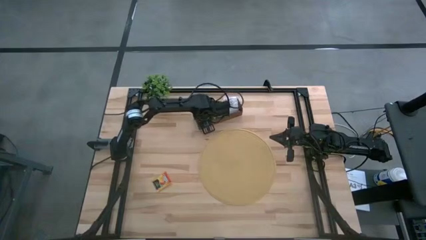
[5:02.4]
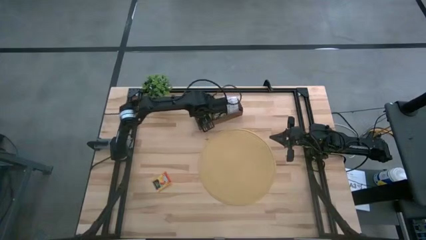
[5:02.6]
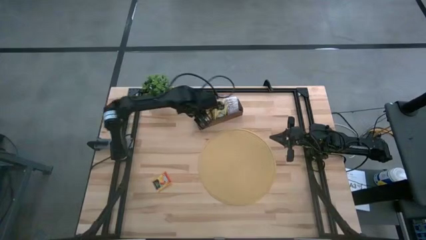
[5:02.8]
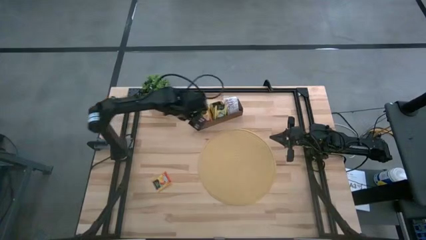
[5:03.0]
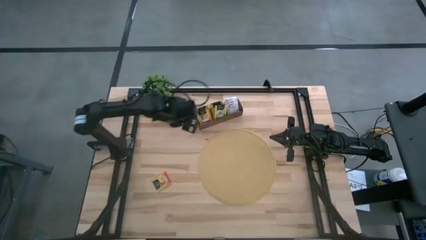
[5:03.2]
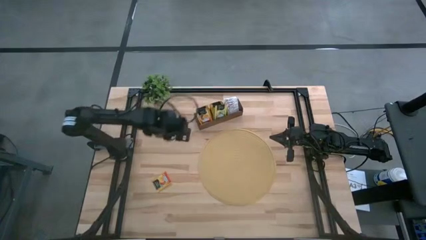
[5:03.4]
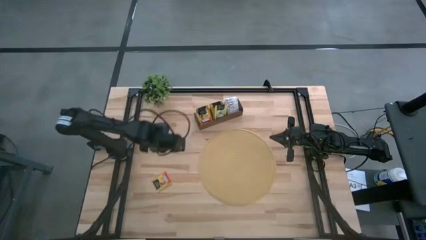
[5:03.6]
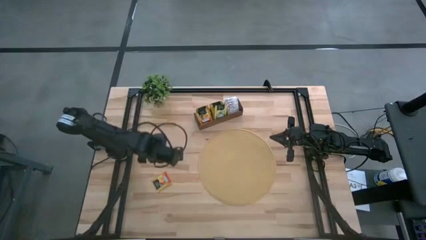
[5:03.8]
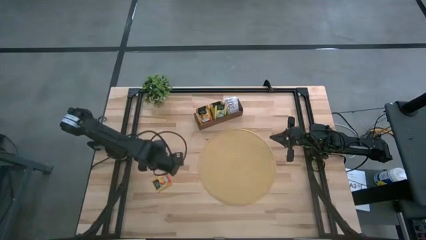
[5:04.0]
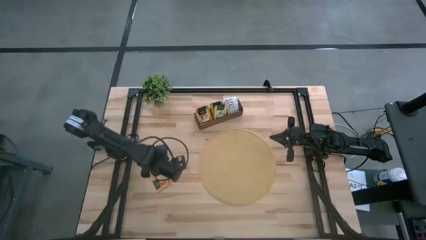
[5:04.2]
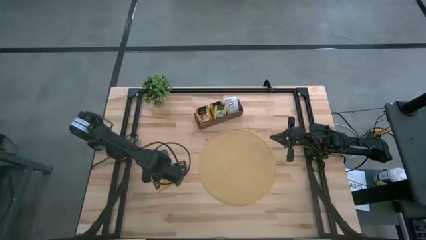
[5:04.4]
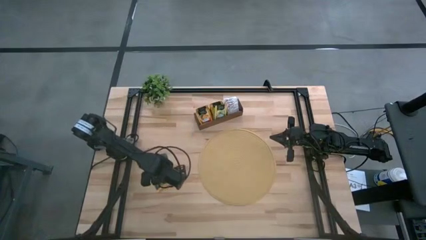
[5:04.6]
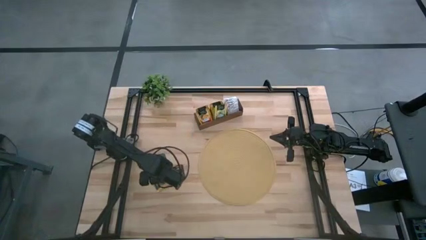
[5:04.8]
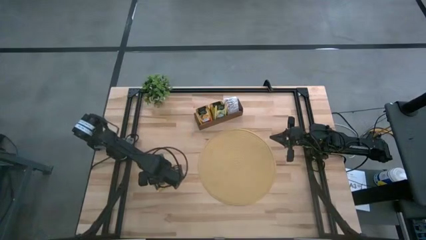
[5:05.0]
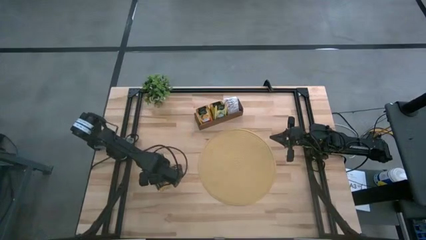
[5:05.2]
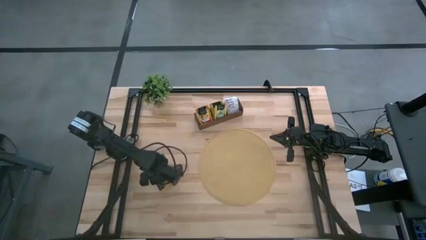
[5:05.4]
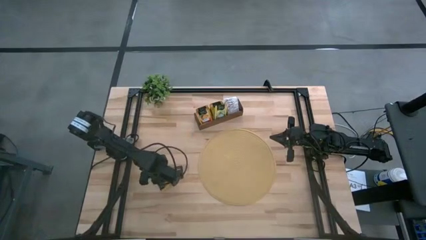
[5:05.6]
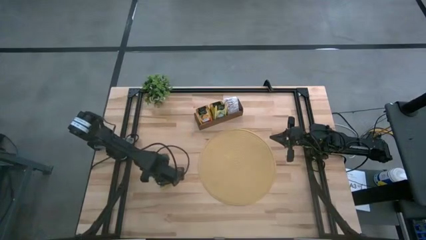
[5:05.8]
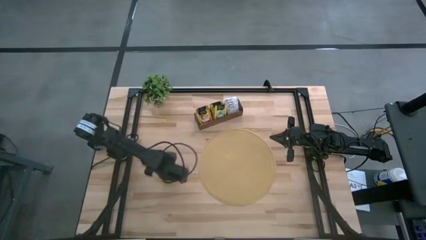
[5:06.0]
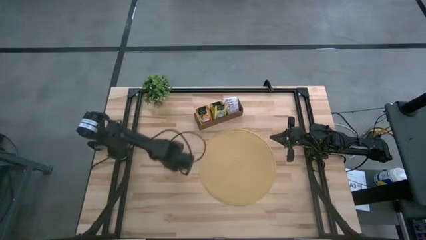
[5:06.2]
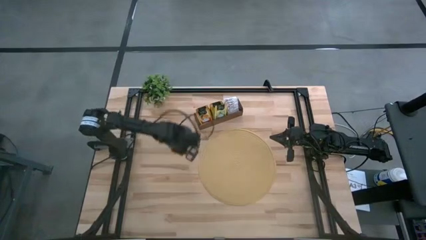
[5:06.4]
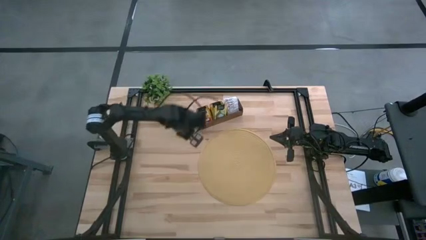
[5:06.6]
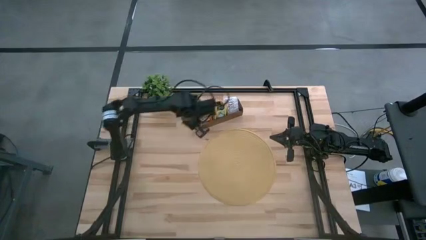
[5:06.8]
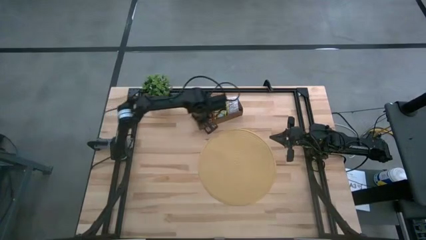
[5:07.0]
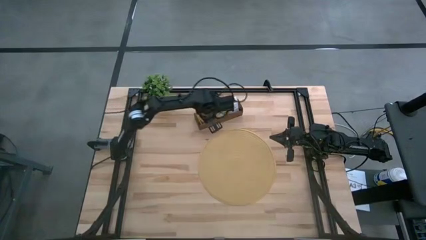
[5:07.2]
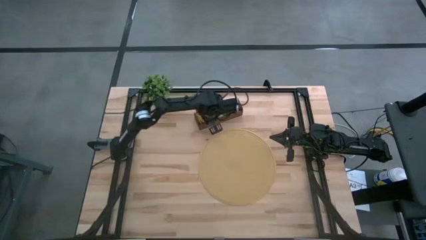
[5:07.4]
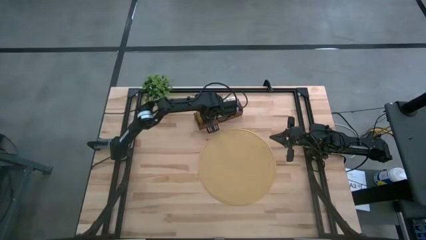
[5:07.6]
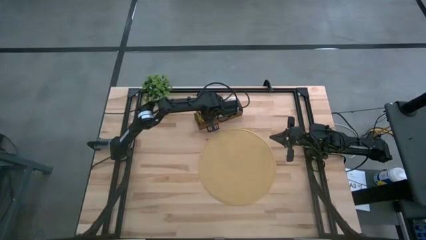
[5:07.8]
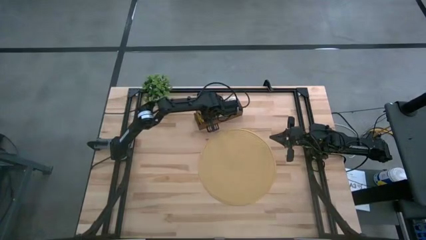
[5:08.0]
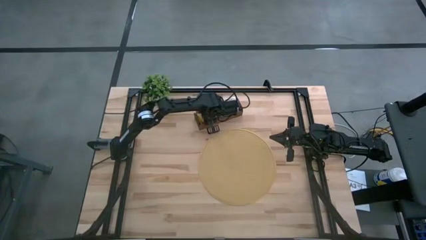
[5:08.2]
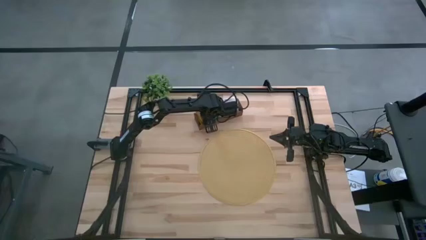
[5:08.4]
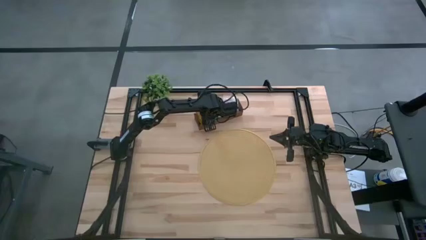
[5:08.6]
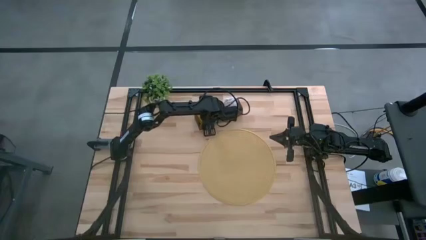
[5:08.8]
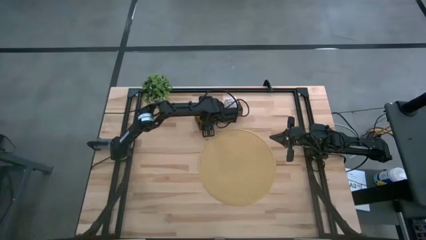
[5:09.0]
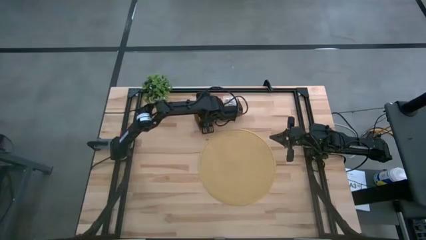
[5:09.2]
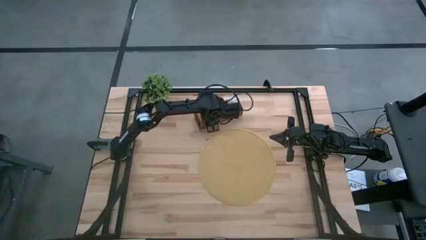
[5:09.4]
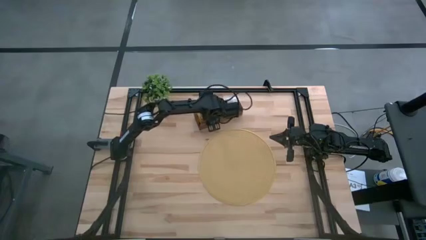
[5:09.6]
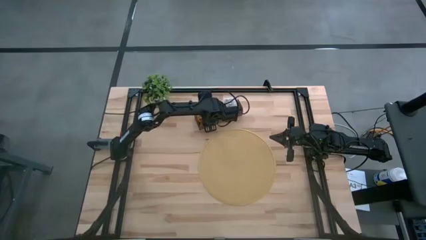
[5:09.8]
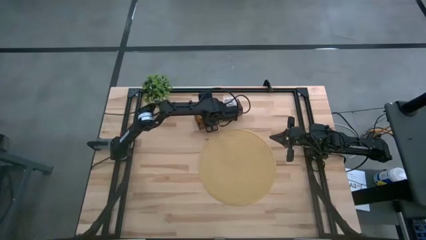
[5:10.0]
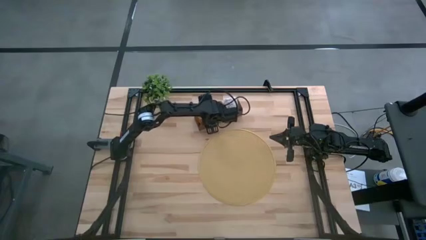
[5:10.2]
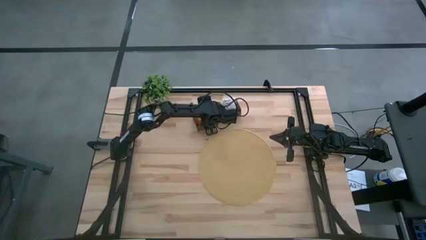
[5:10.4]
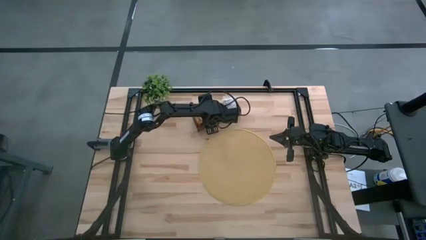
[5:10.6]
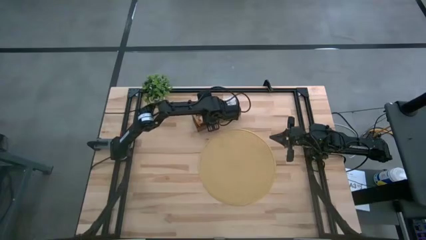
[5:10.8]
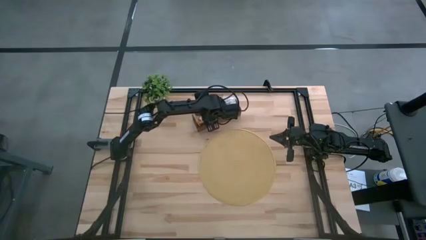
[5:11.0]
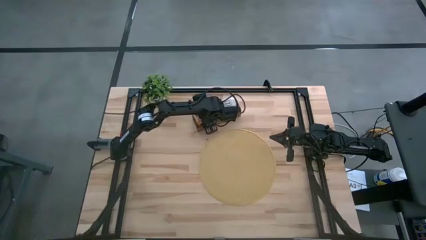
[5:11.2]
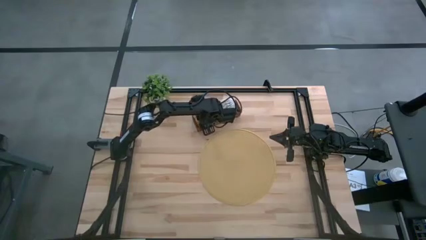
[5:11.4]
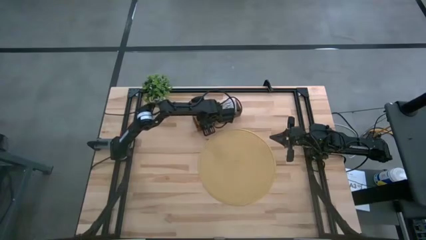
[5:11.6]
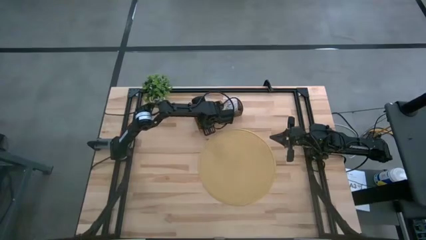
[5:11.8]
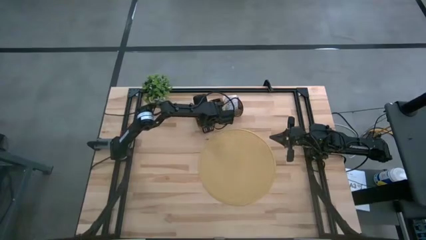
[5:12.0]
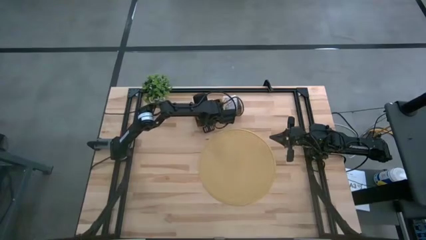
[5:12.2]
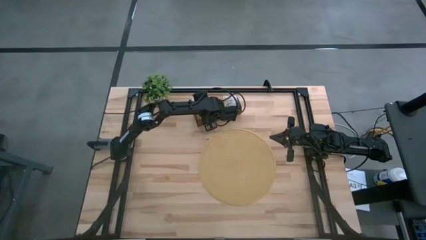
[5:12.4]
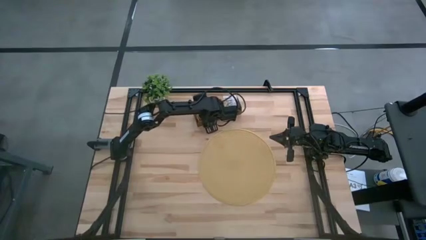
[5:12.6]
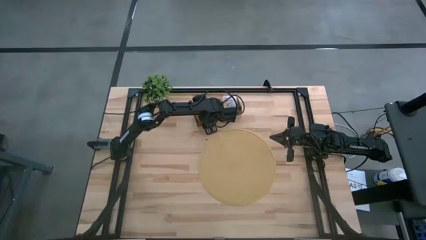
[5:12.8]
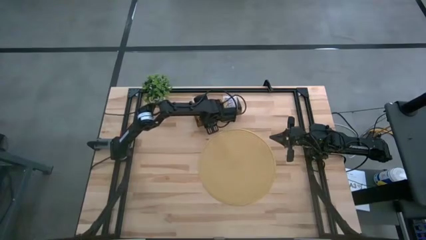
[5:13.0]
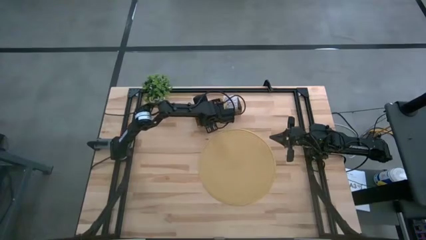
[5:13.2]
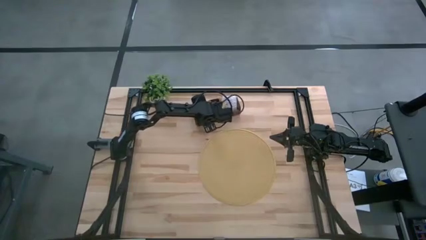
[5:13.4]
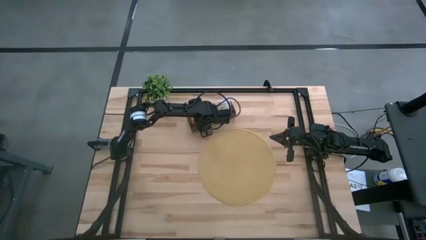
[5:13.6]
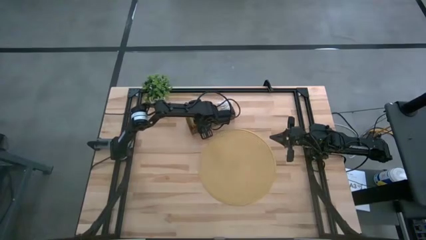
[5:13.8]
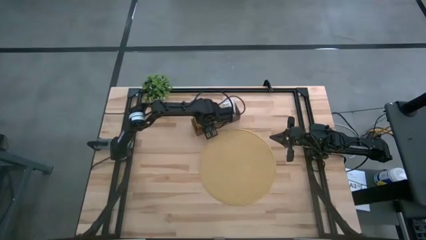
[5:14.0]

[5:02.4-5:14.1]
Task: Pick & Place Tea
Put the orange tea bag into the left section of the wooden organizer

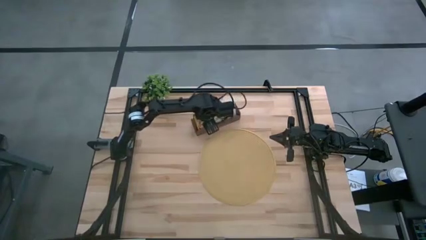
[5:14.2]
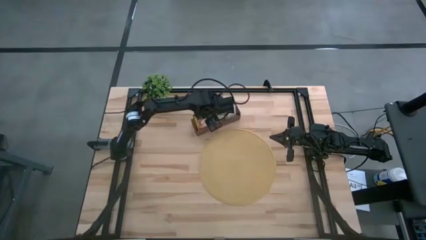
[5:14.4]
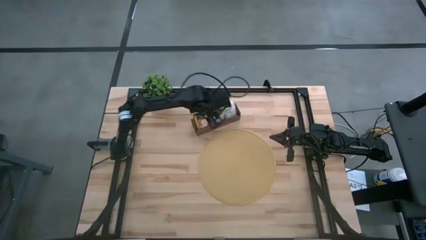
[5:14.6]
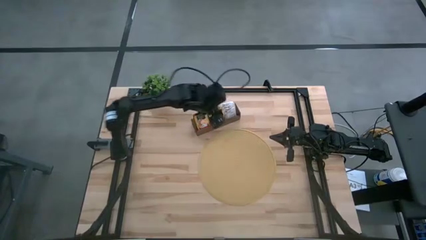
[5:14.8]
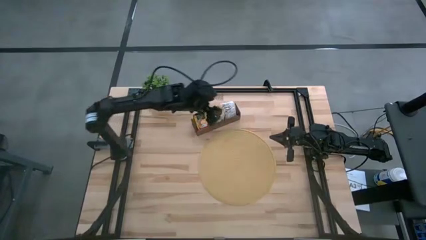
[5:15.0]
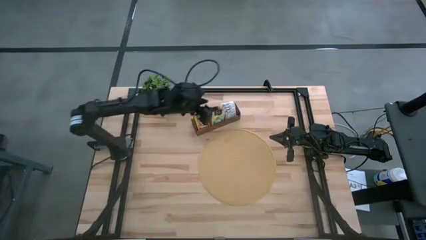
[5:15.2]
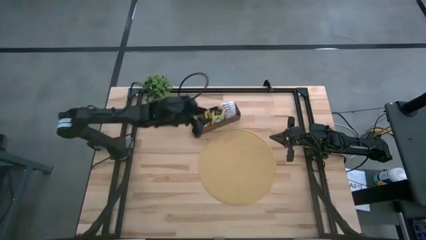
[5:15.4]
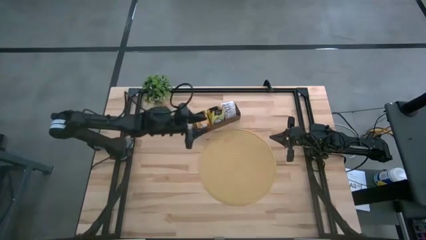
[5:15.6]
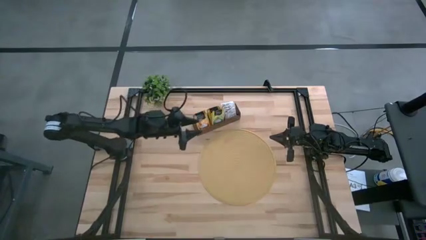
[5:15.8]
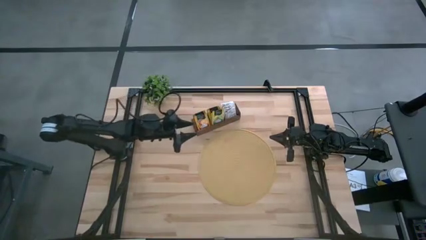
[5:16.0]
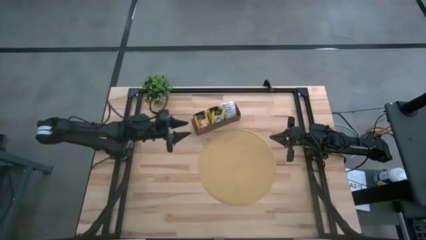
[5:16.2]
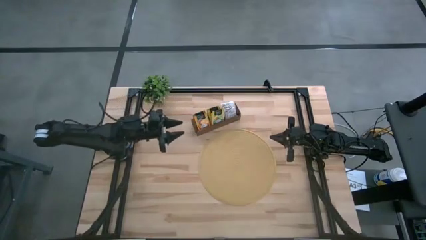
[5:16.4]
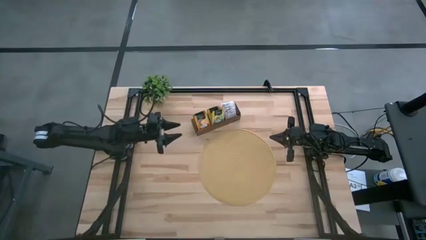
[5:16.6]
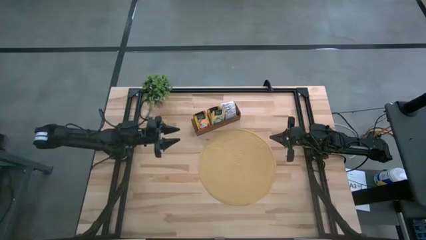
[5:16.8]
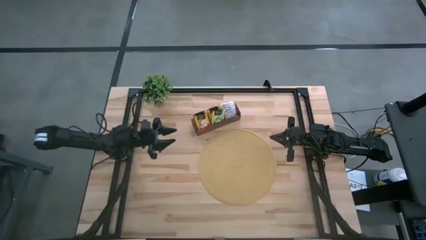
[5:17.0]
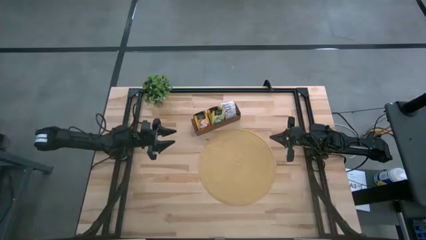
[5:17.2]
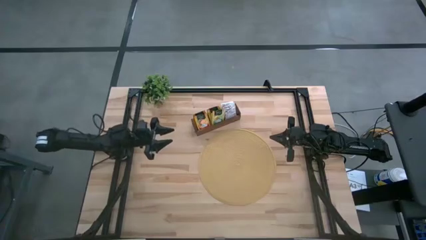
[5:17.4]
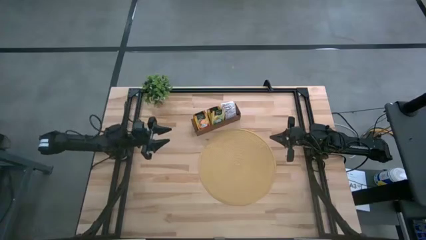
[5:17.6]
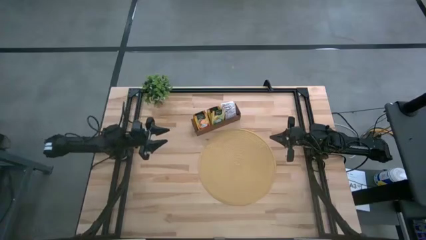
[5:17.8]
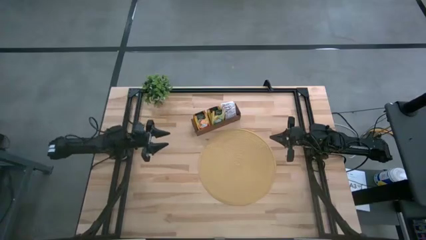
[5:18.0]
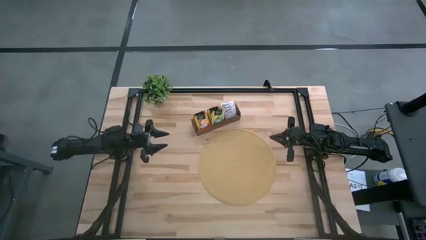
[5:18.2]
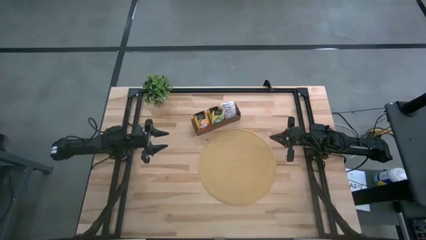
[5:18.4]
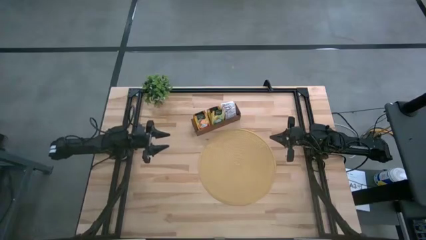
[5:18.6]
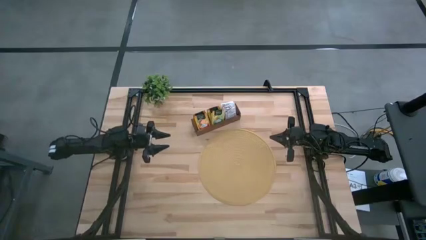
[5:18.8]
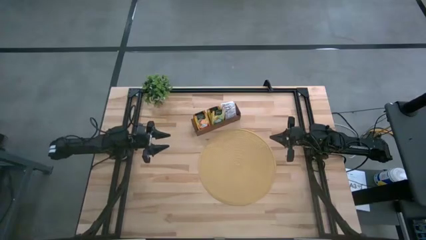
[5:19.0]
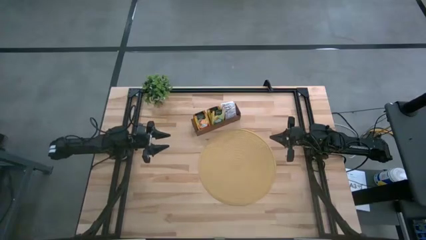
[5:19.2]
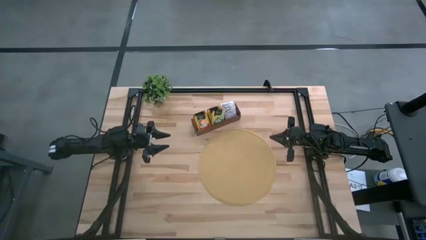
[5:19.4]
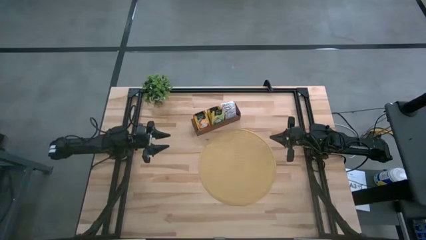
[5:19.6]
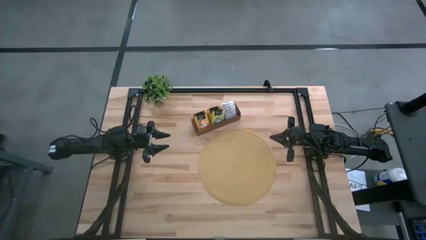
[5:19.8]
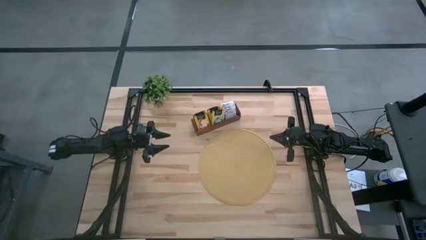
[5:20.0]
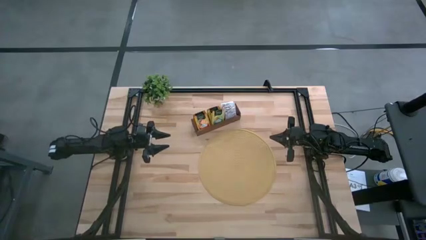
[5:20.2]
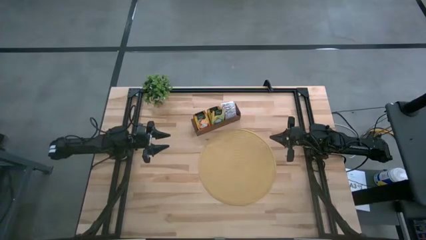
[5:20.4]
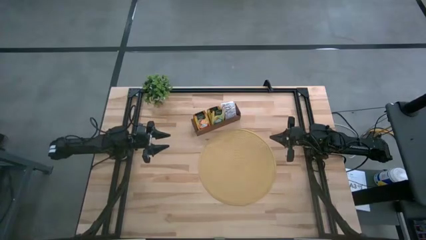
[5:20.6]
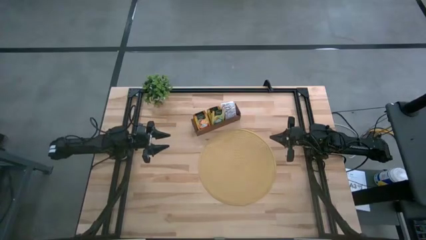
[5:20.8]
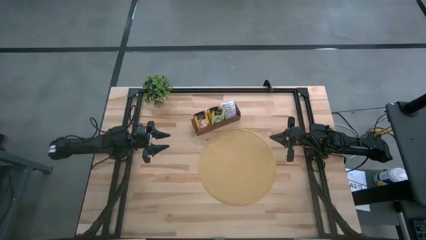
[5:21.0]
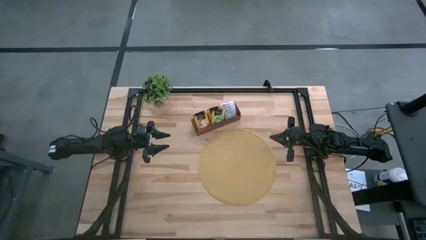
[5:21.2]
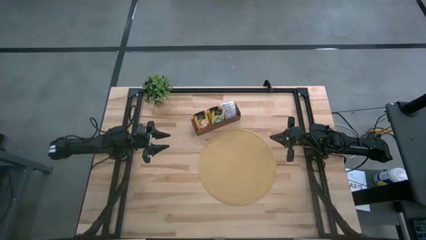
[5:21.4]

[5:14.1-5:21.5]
Return to Home Position
